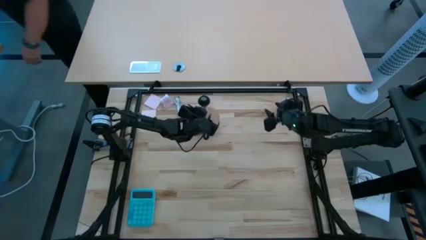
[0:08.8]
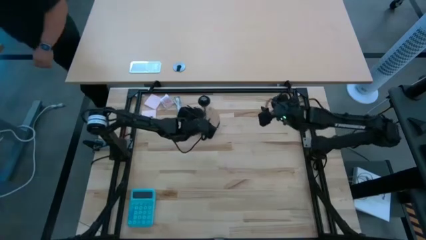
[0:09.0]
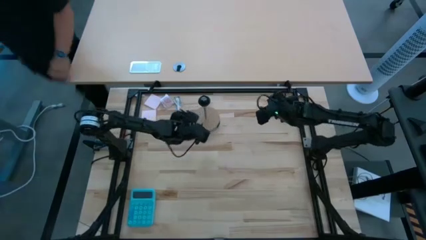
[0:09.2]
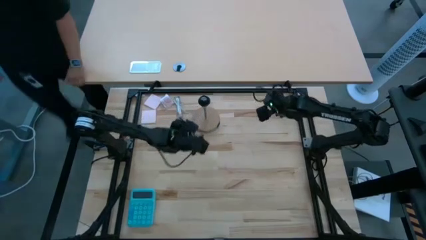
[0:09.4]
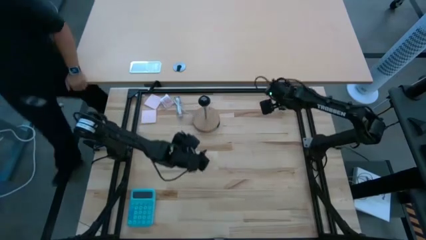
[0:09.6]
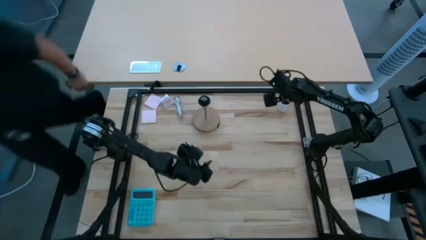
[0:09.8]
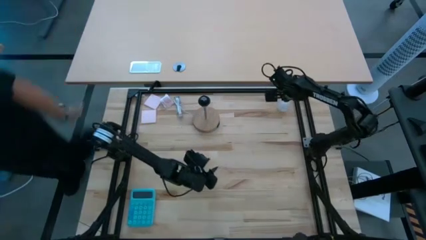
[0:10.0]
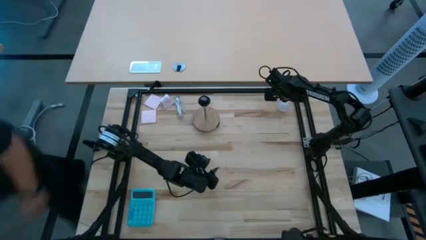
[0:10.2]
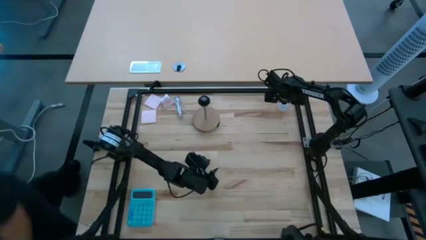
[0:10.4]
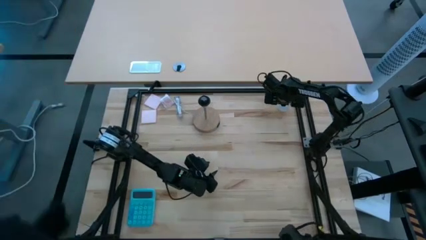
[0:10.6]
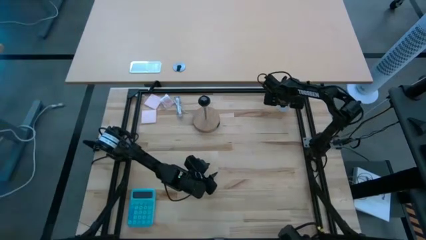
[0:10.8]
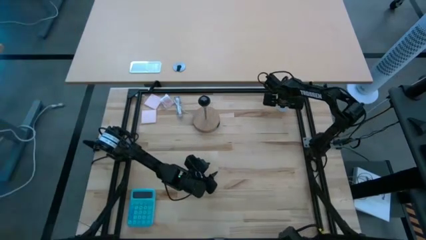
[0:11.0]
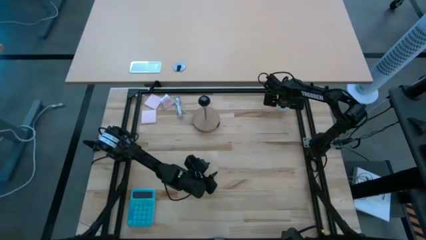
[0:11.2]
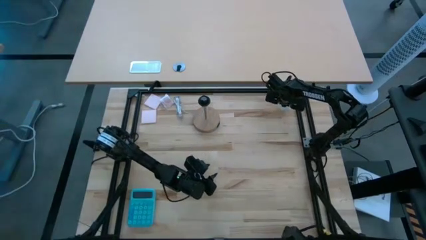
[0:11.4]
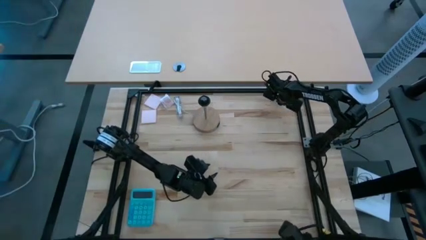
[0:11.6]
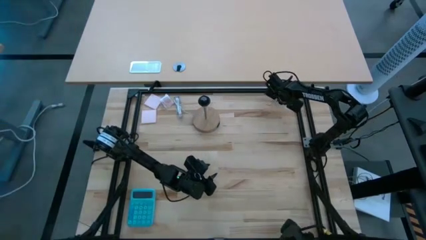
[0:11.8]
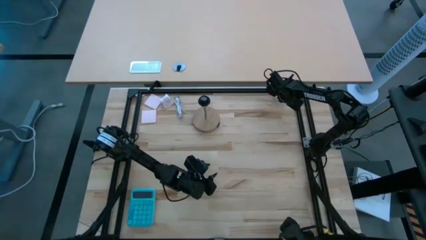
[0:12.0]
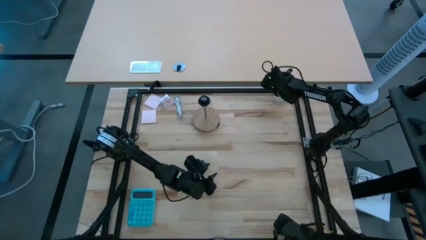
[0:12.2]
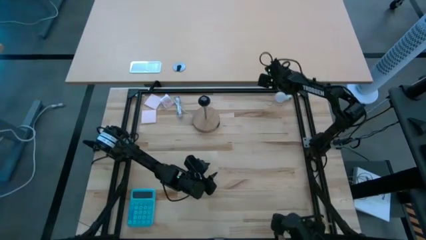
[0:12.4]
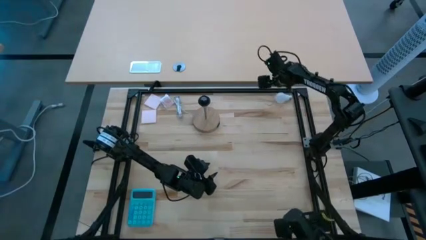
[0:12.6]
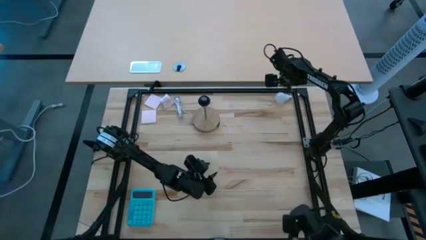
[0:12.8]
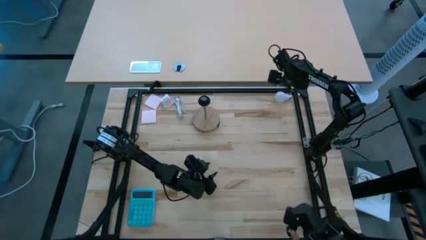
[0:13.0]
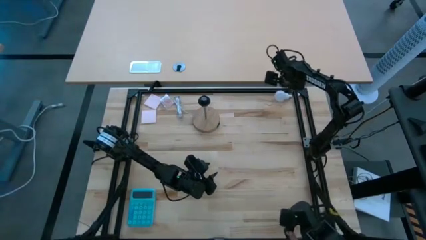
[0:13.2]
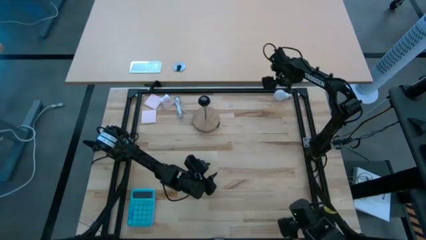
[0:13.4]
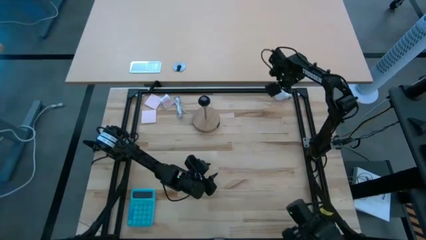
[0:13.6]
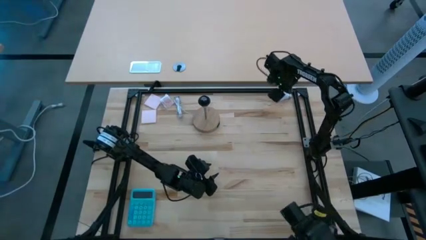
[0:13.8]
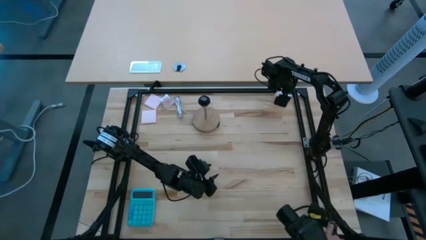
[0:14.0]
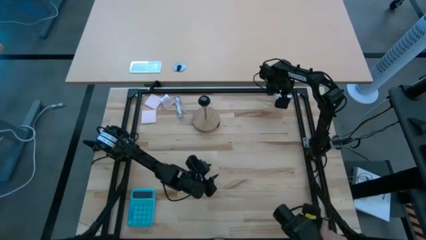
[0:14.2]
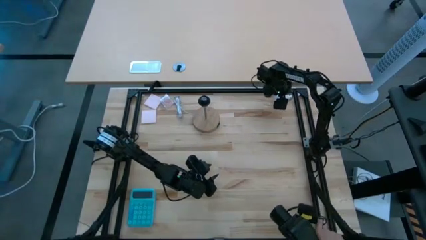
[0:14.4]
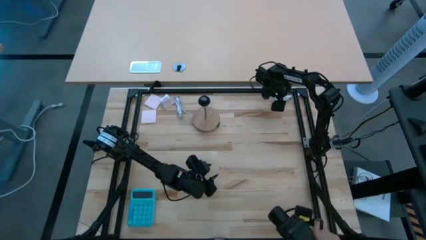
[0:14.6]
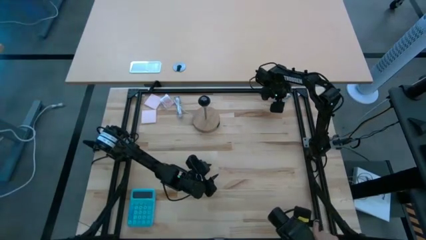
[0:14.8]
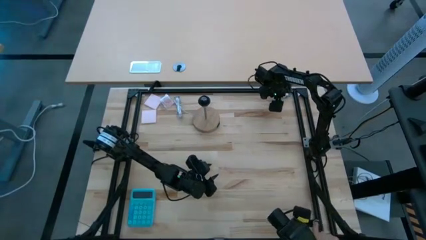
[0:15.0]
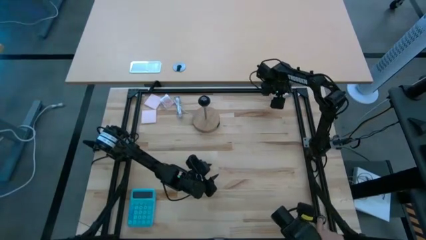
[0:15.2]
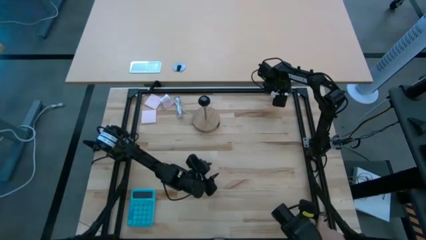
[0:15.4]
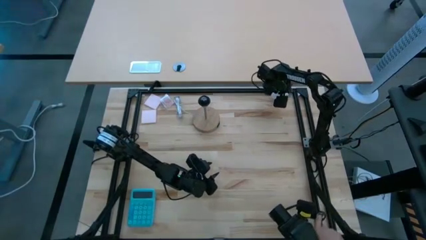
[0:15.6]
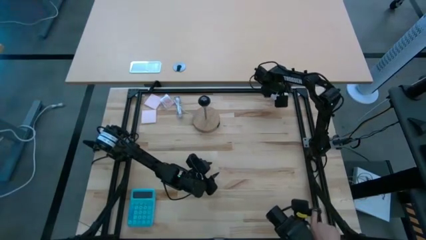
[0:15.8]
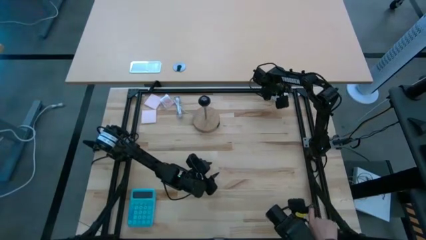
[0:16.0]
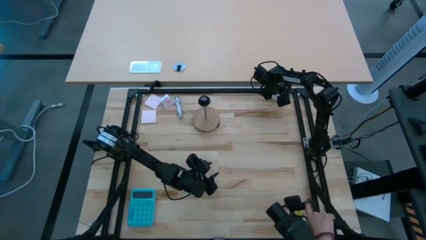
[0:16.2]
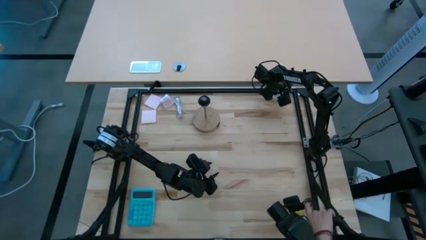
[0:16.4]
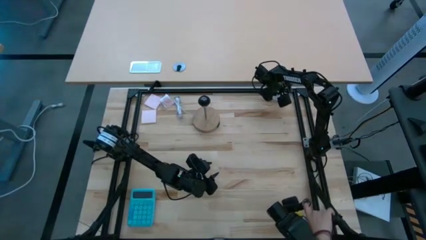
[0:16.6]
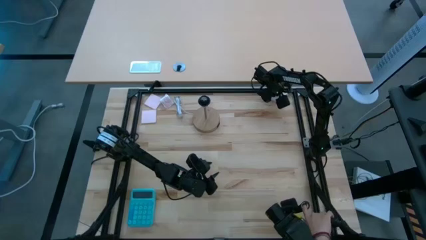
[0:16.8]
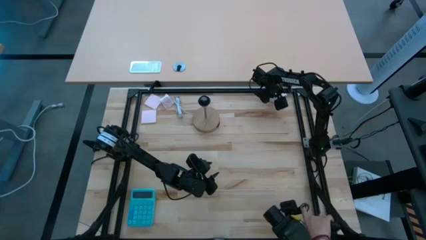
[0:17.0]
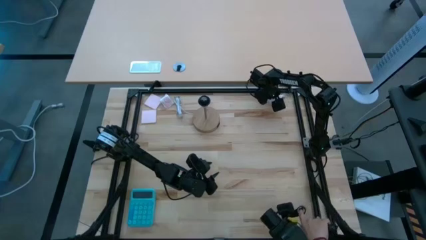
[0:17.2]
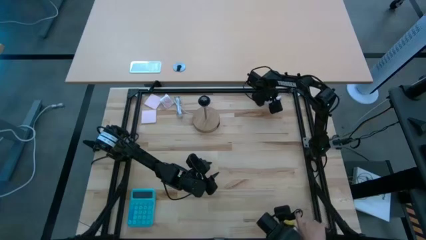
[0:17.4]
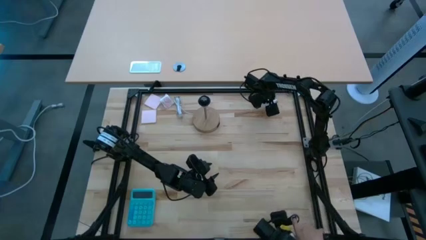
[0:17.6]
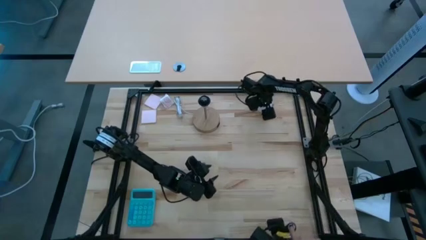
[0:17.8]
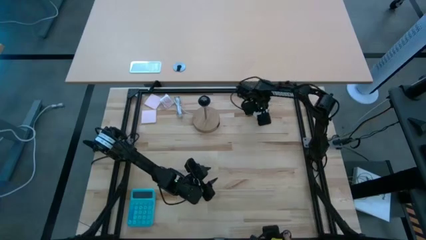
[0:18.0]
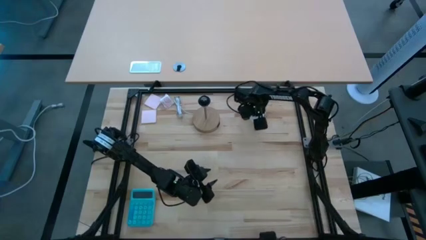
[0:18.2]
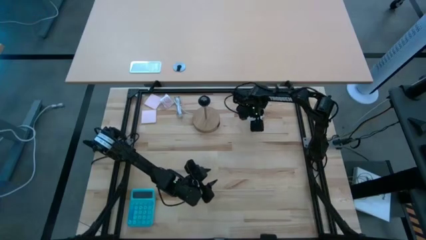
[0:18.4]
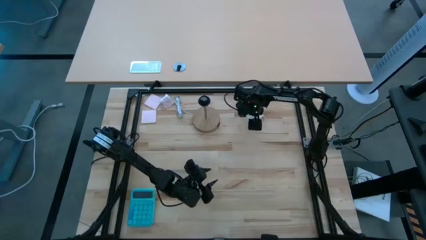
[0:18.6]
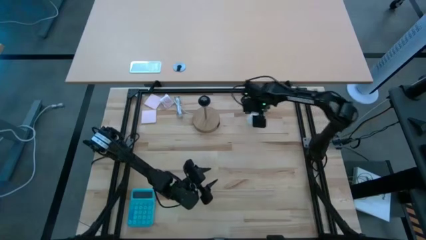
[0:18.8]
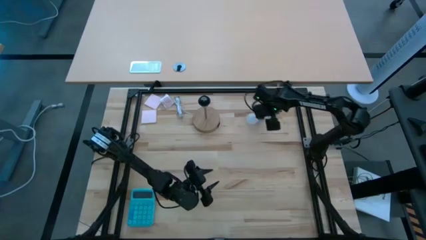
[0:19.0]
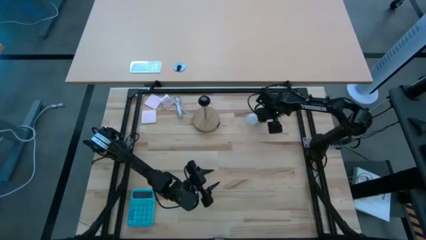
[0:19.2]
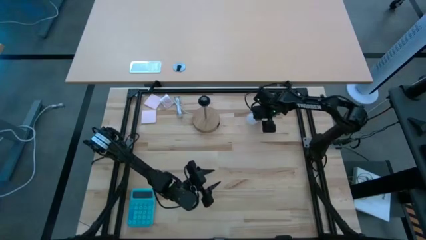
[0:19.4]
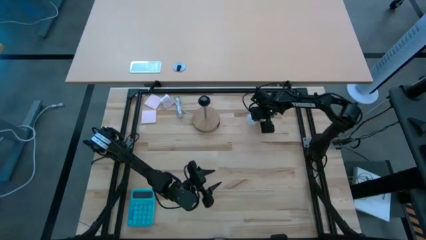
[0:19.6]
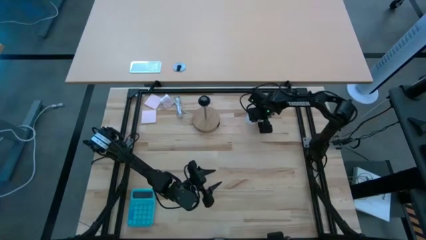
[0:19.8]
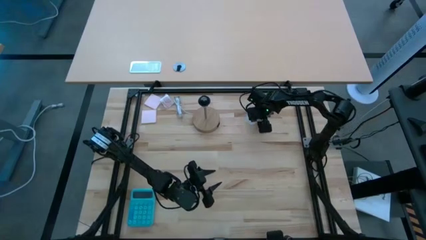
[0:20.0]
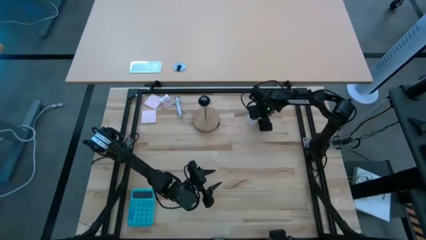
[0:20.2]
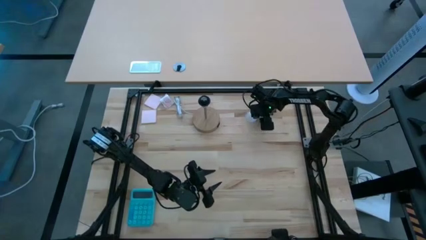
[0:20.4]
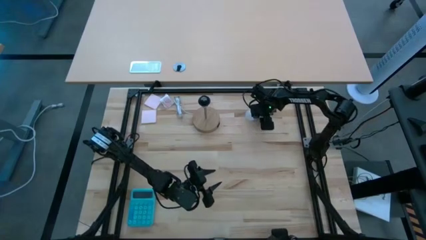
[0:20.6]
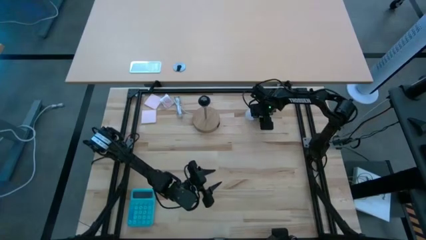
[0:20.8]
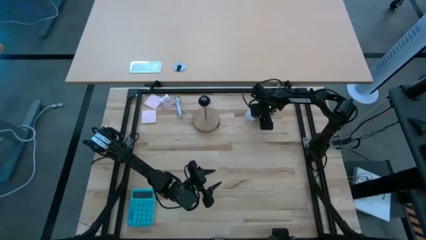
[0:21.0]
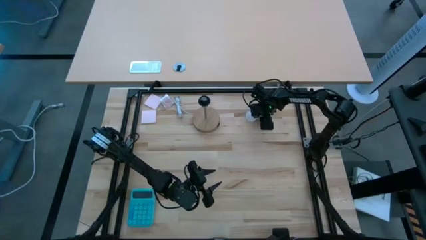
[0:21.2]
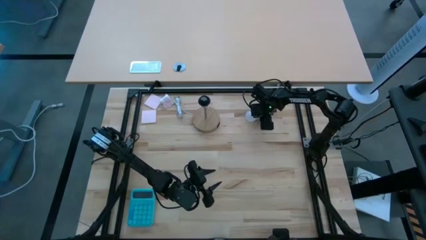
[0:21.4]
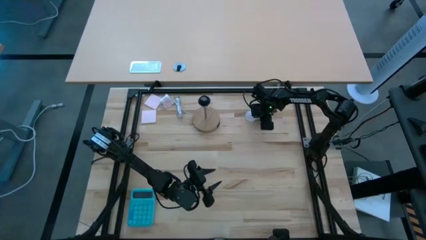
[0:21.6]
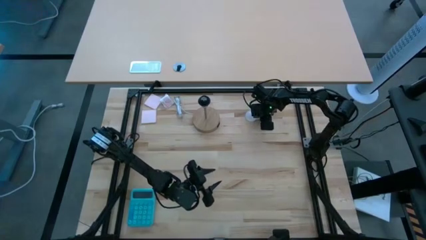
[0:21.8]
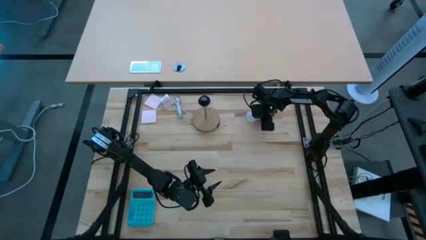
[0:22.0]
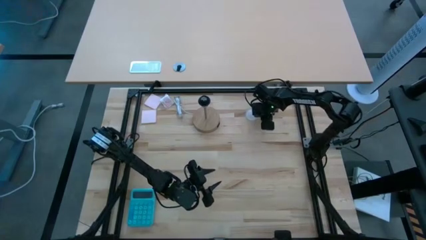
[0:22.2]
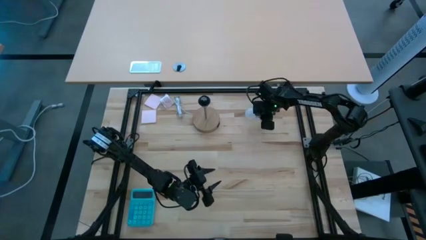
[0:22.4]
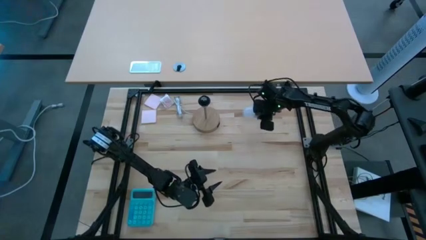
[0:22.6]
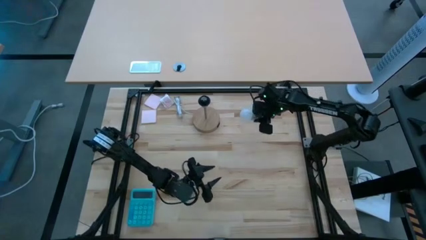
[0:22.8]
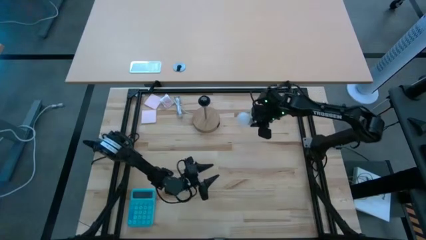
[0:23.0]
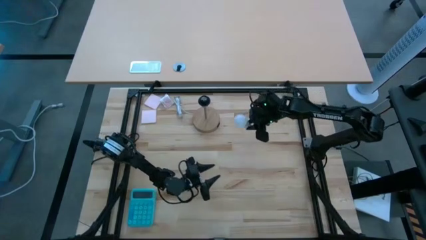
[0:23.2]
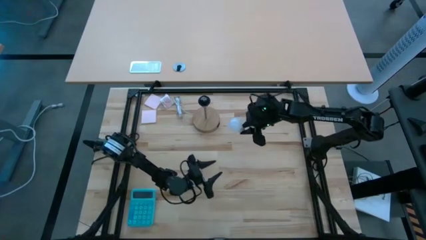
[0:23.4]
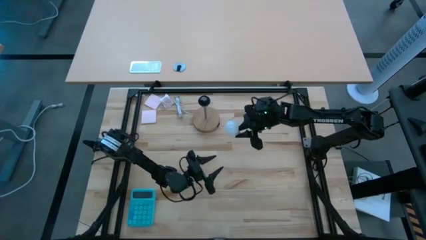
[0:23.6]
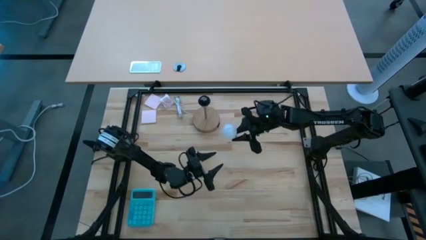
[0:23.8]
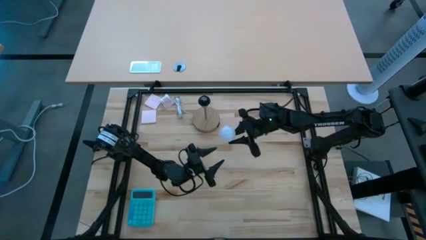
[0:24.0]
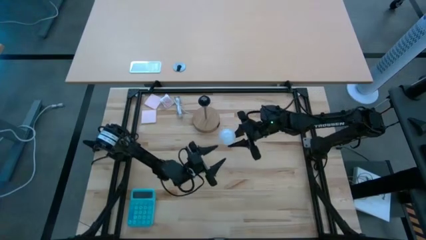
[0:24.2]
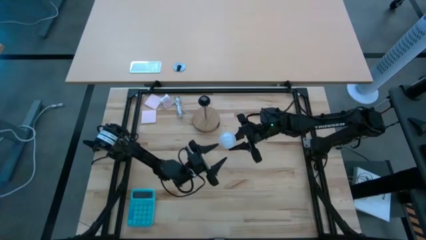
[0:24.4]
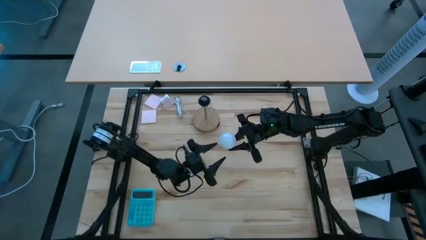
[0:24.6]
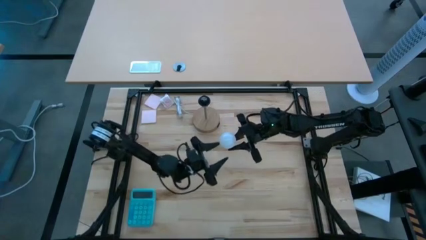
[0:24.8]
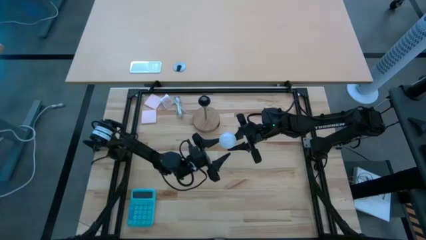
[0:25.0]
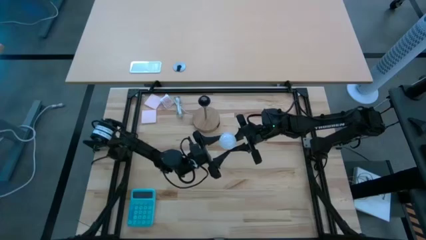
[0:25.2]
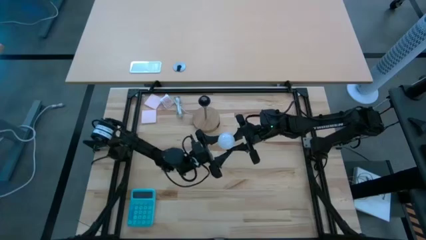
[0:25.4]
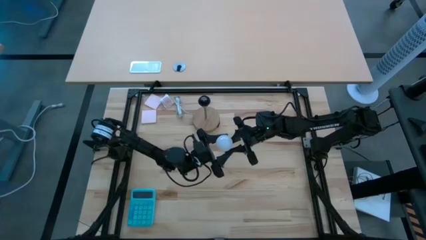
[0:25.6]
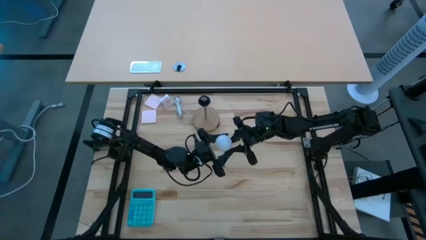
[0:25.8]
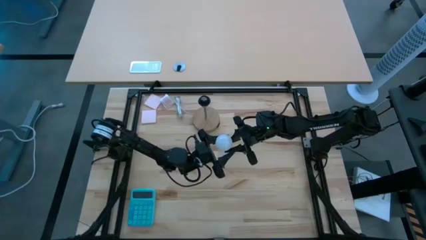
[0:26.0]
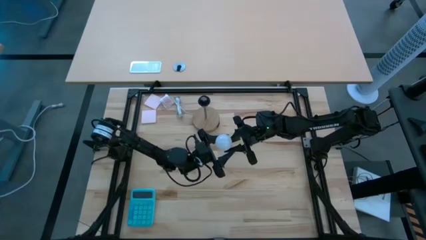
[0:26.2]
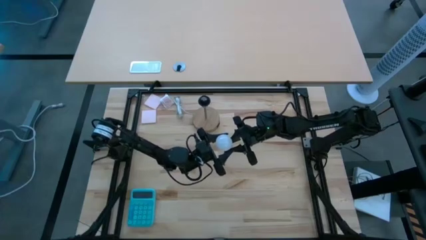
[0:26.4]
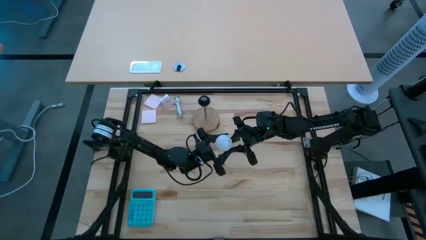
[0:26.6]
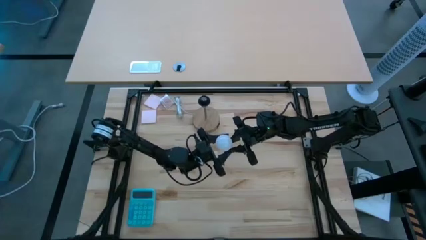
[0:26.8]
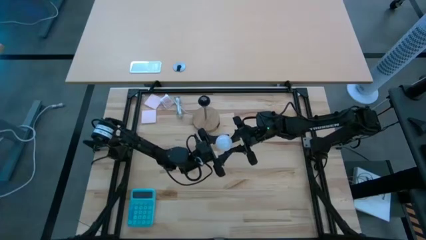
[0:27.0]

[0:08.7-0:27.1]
Task: Screw lightbulb
Insert the lightbulb into the lamp
